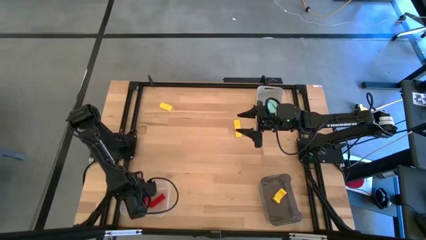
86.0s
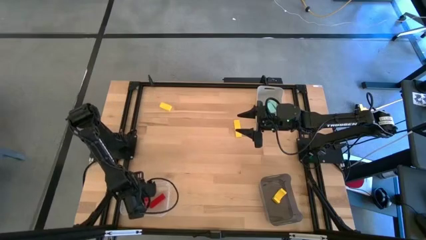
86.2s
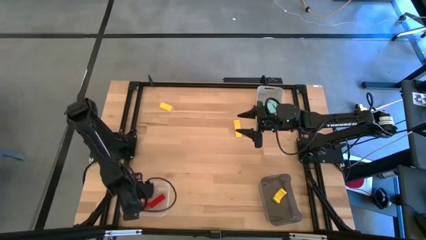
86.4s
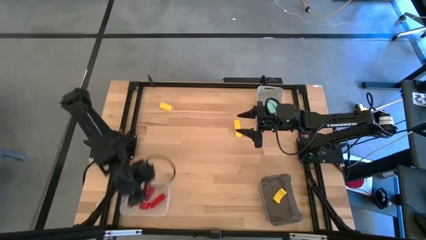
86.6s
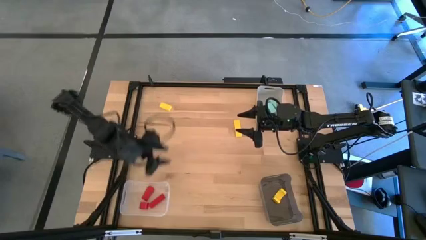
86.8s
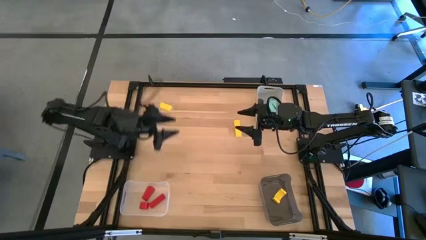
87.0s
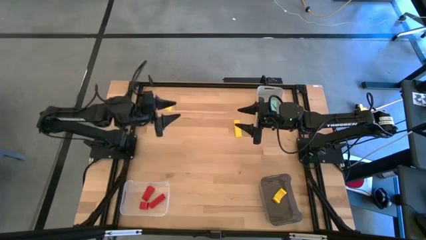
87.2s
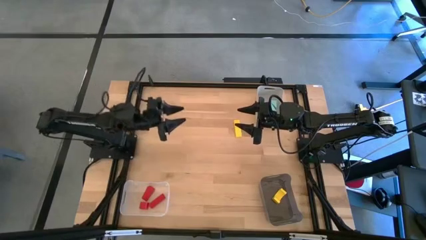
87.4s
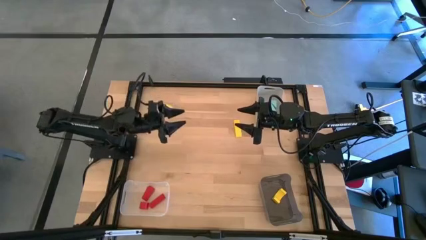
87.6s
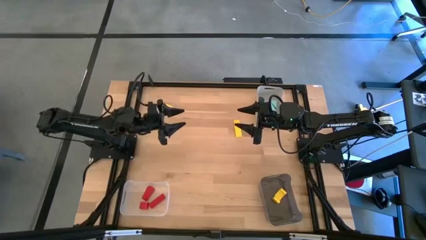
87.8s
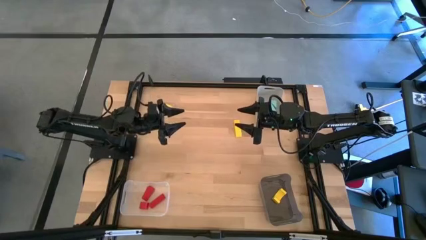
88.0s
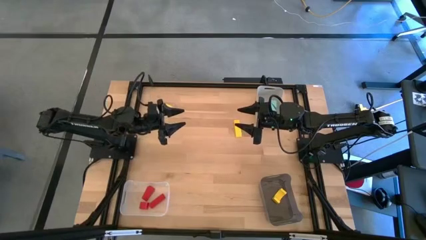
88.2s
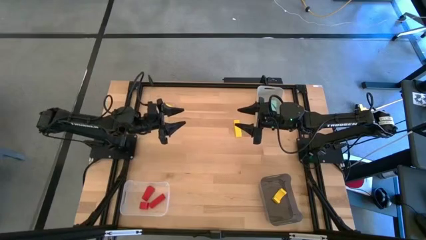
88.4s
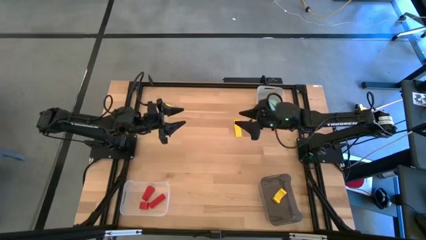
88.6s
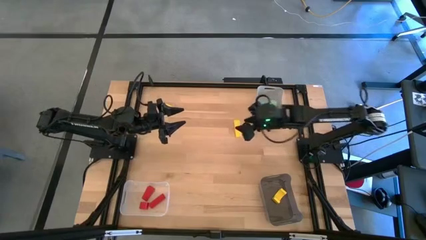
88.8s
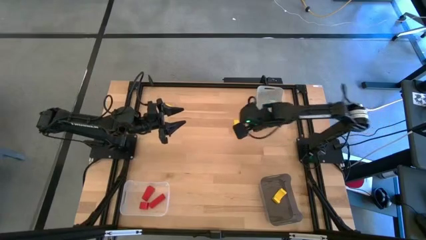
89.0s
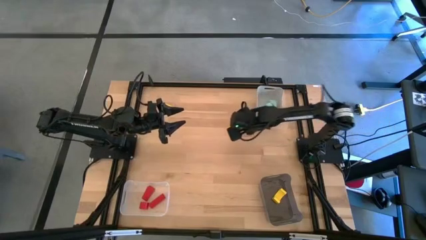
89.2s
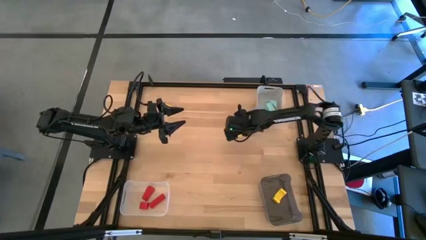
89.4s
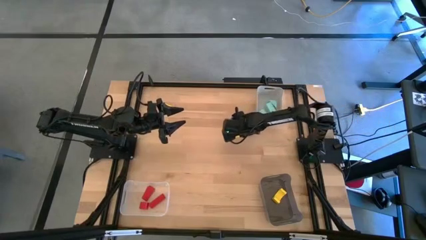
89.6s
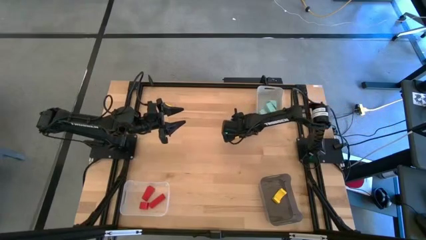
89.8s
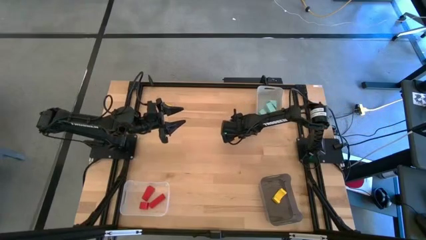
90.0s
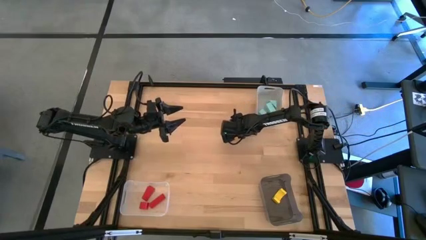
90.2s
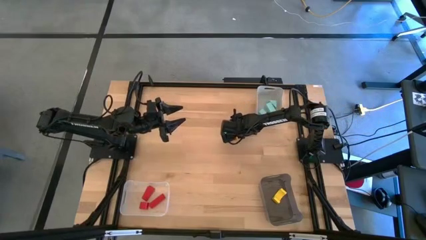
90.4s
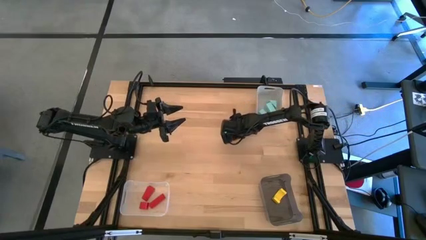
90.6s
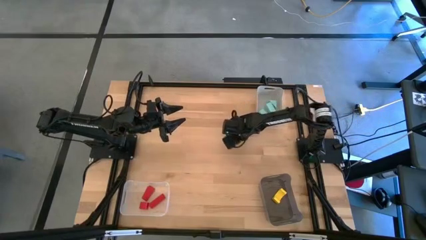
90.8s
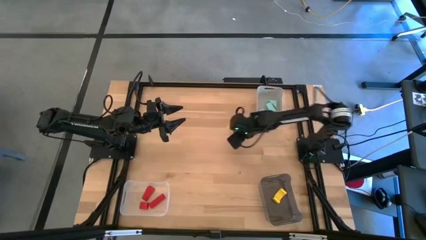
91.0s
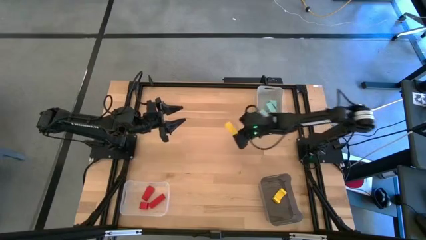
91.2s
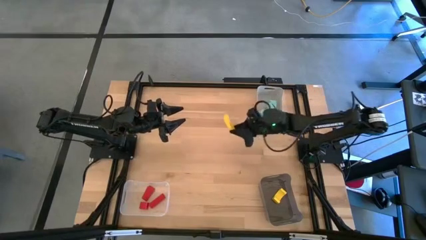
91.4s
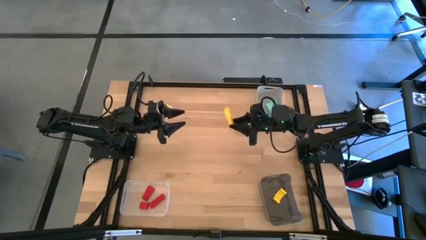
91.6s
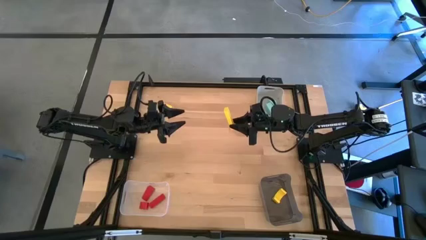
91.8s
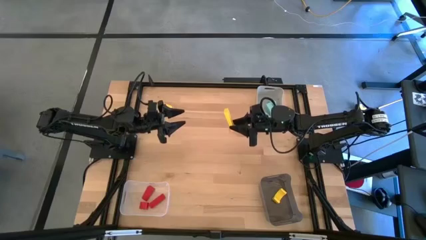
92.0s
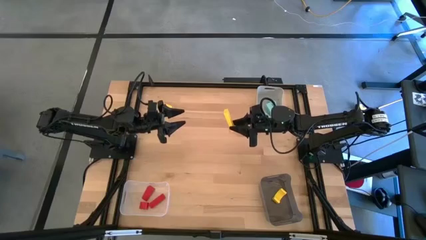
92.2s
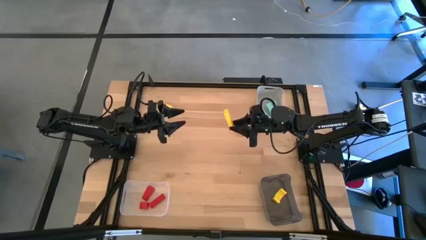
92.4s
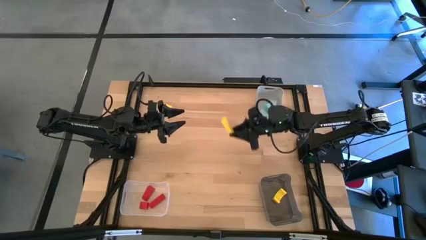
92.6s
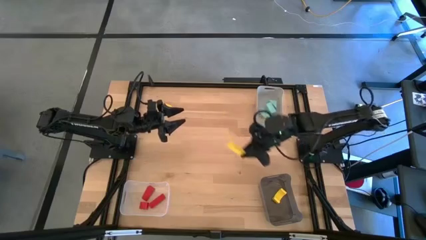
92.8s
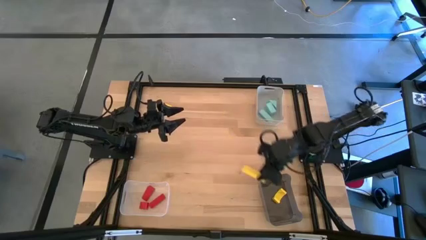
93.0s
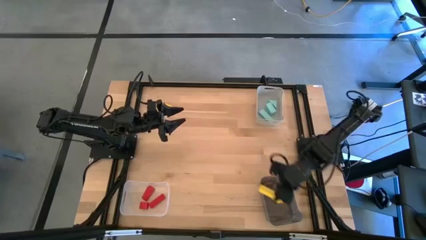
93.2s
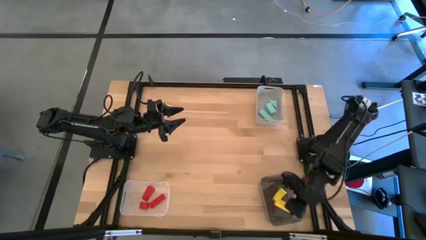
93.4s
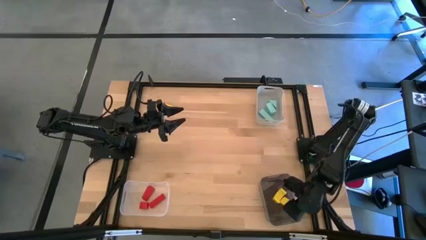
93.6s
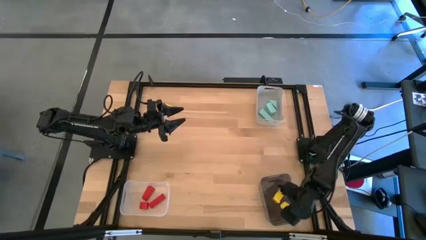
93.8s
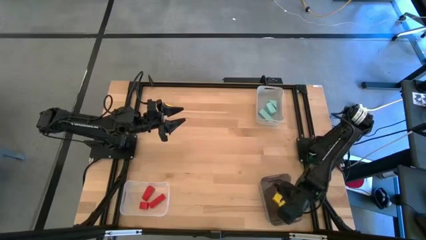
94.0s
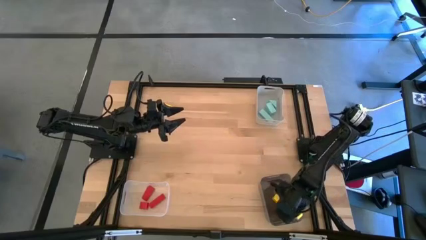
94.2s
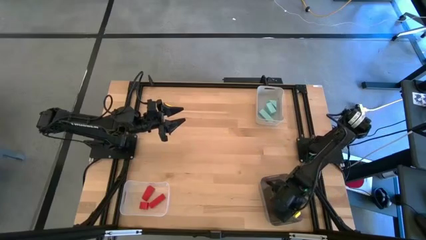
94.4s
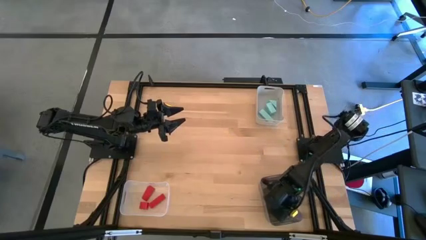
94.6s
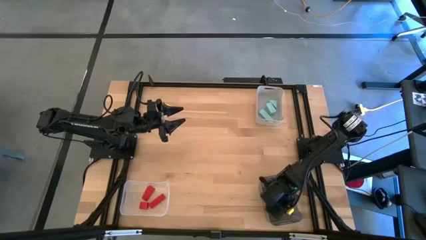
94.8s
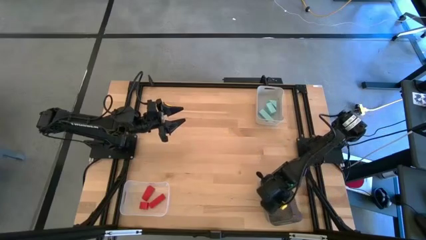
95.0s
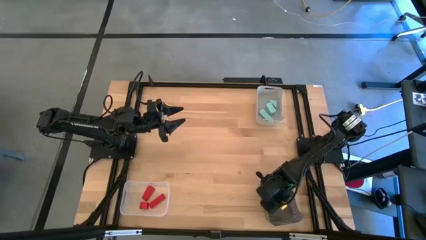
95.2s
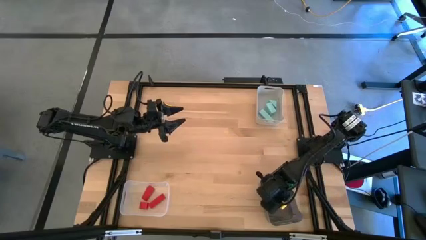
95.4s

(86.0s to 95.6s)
Task: Sort & place blocks by color
Put the right yellow block into the black bin

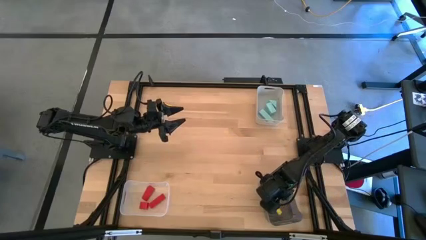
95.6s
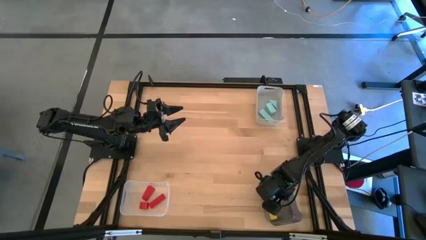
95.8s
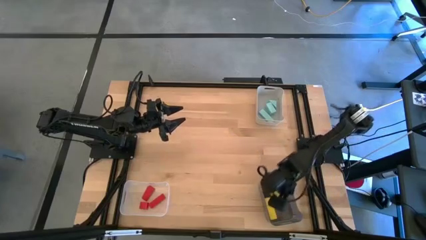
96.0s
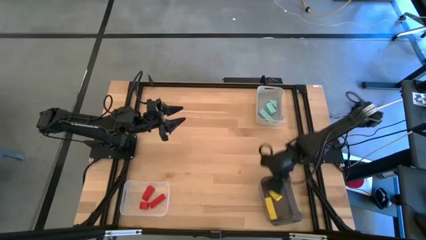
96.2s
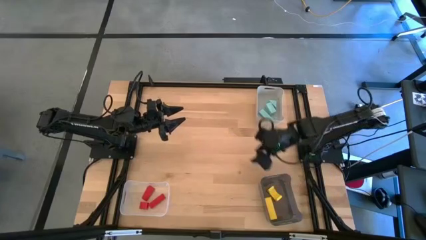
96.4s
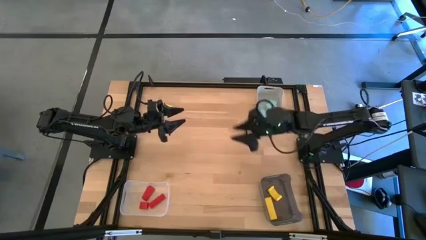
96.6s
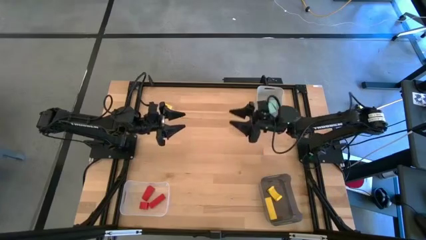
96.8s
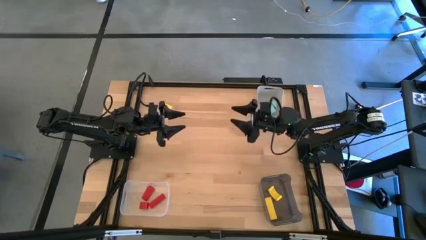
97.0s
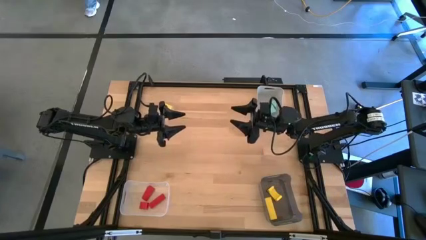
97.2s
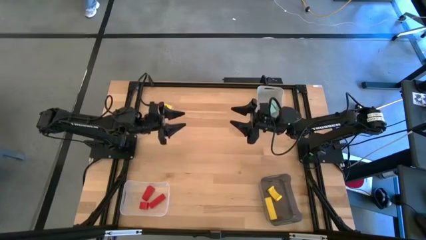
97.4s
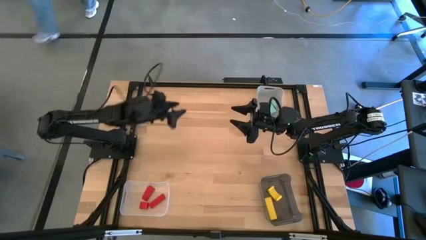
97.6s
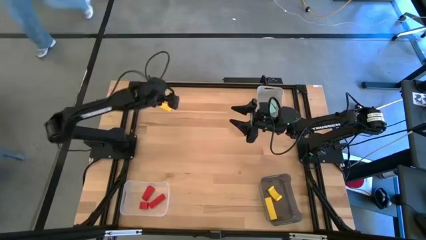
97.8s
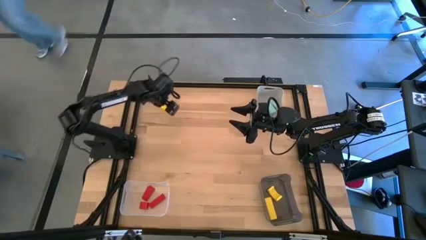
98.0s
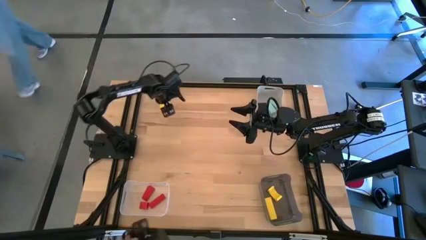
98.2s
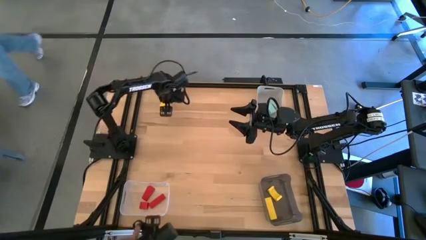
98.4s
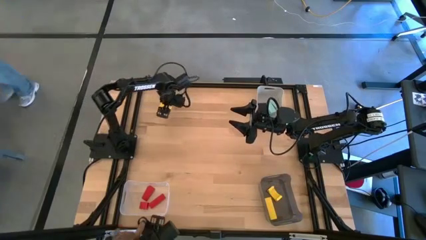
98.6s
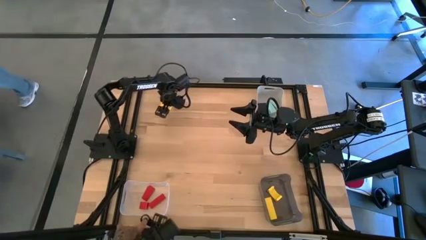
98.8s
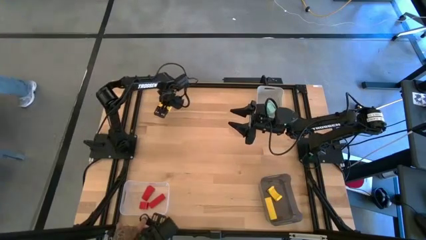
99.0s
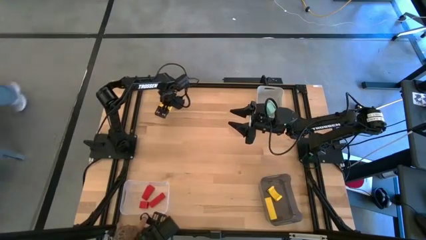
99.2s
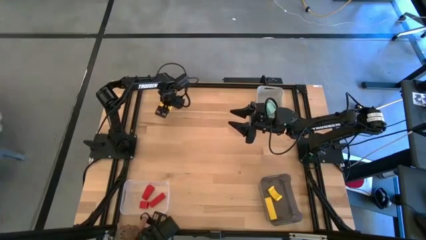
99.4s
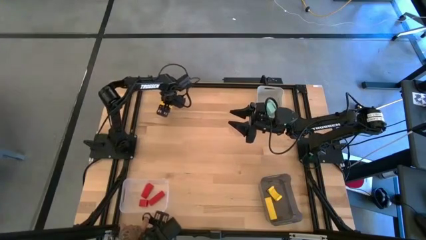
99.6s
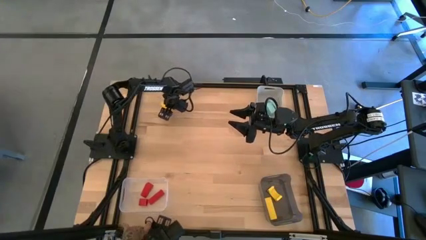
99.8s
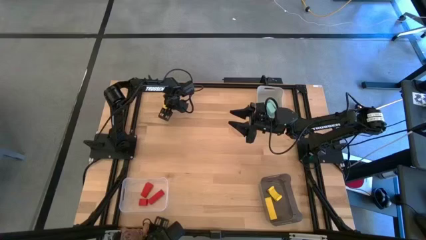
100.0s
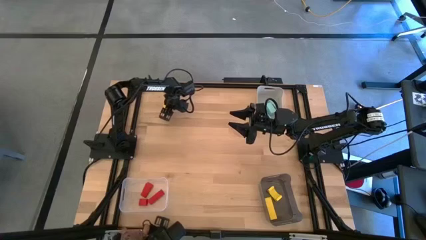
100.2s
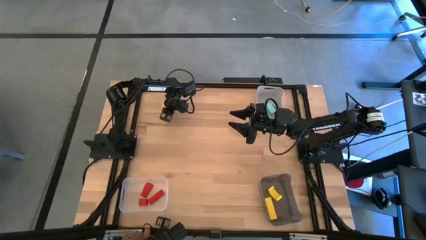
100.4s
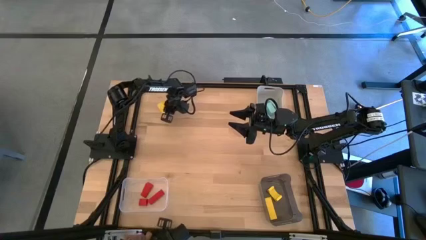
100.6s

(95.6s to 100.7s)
Put the yellow block into the black bin

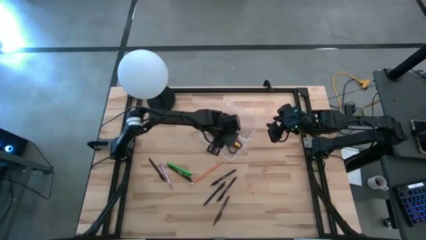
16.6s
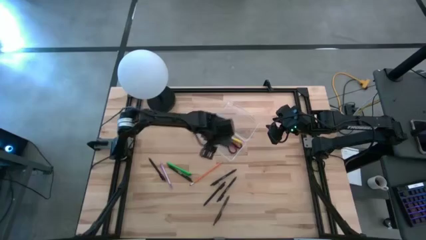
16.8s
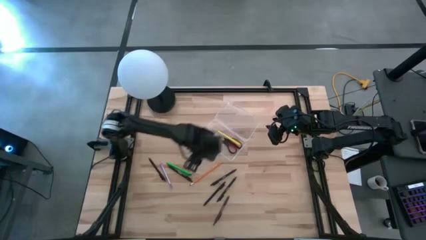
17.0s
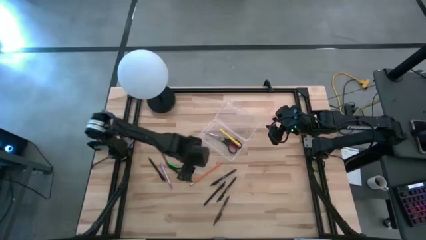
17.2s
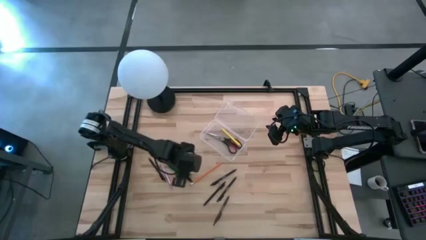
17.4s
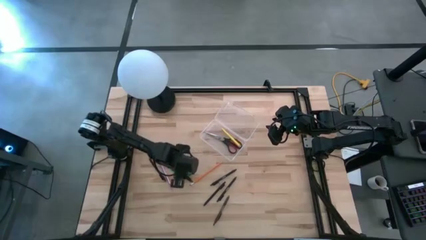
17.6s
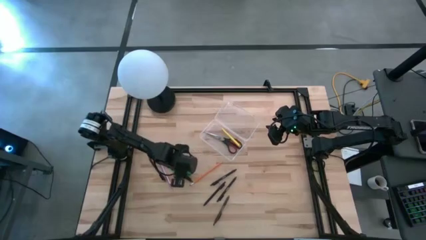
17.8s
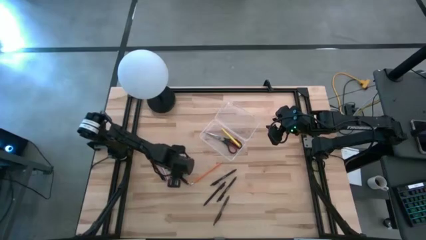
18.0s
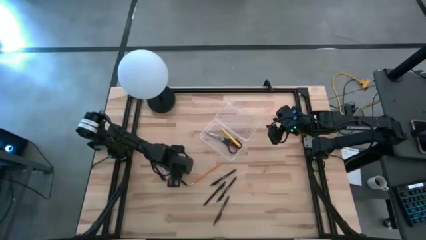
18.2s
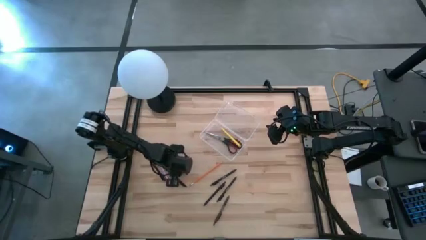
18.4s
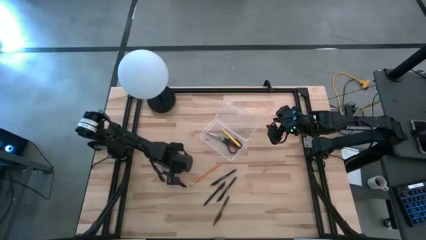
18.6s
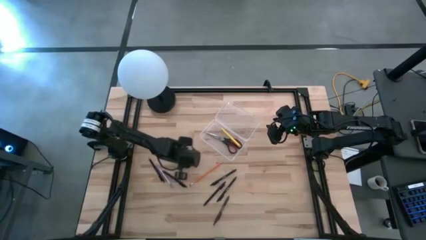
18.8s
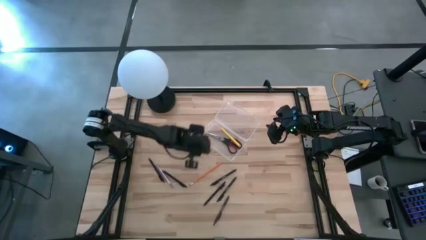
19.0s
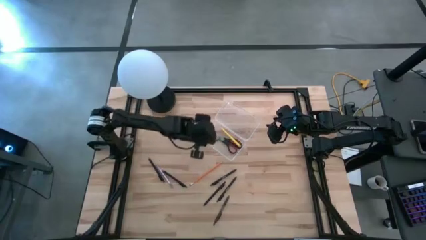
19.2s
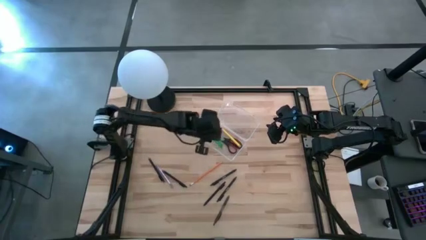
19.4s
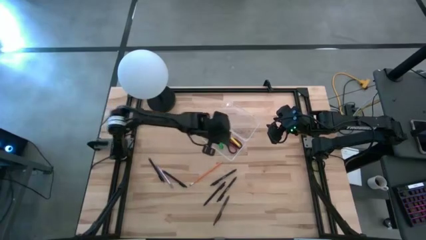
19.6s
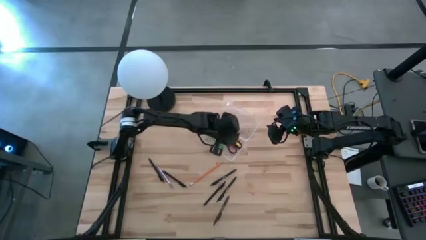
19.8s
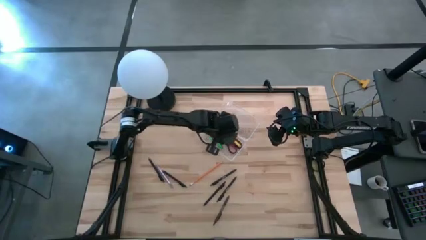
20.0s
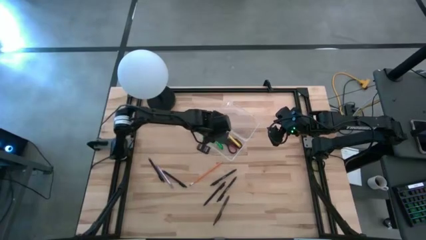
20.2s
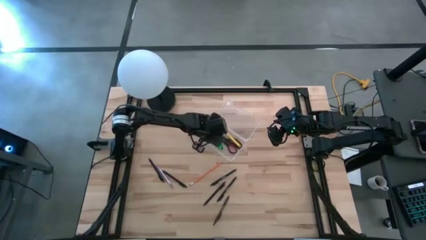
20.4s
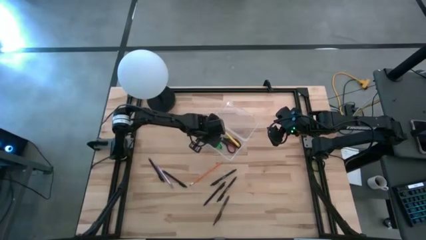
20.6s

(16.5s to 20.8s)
Task: Pick & place school supplies into a supply box
Put the green pen into the transparent supply box
